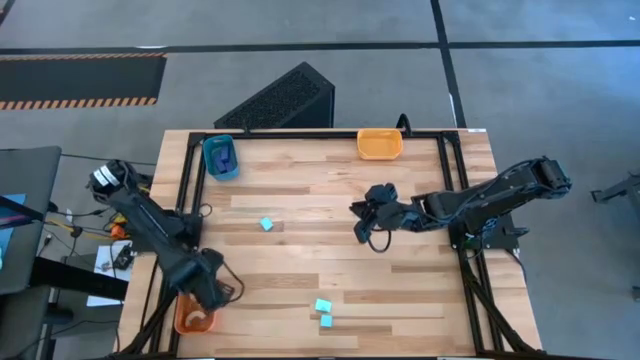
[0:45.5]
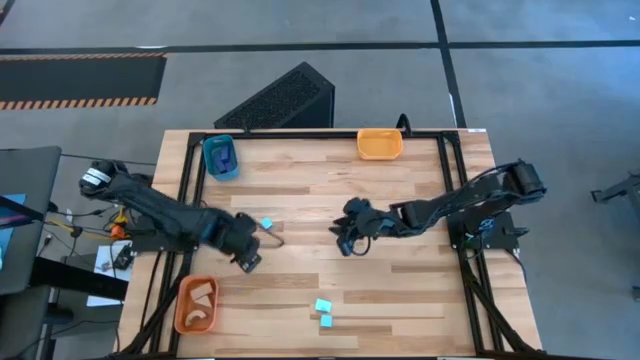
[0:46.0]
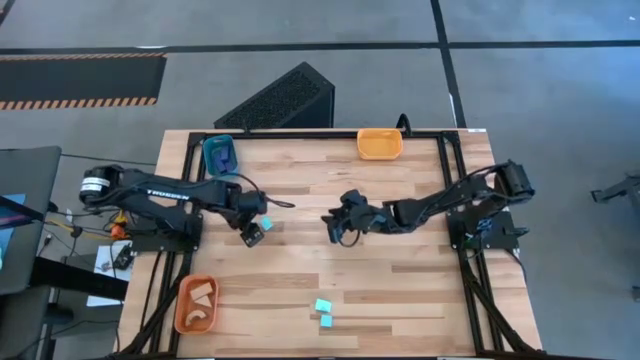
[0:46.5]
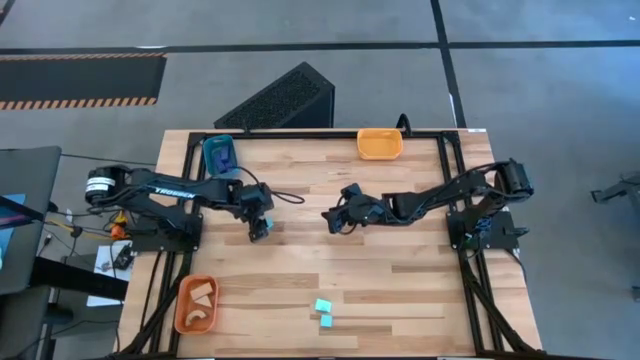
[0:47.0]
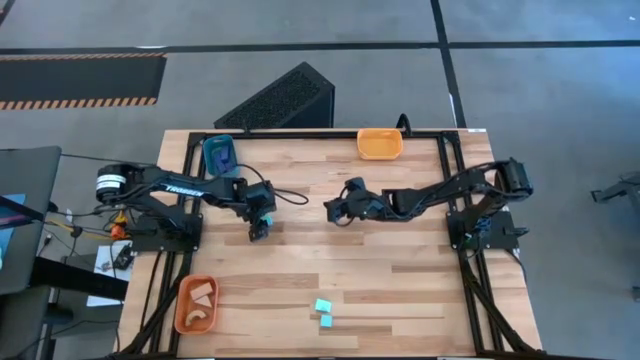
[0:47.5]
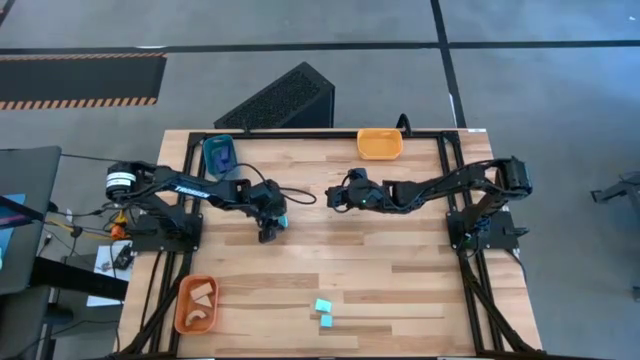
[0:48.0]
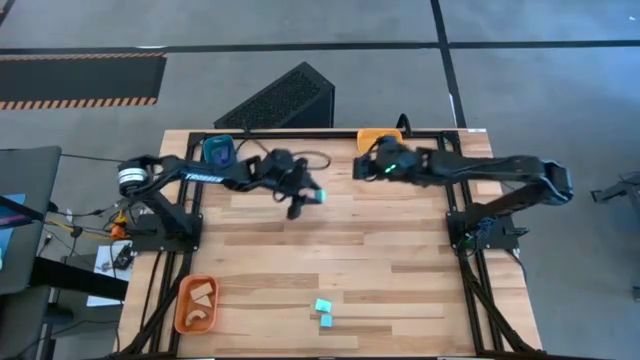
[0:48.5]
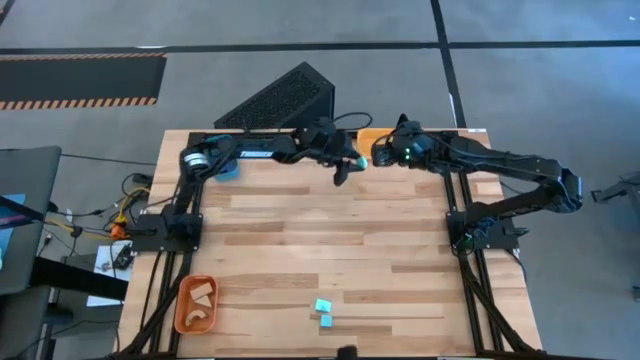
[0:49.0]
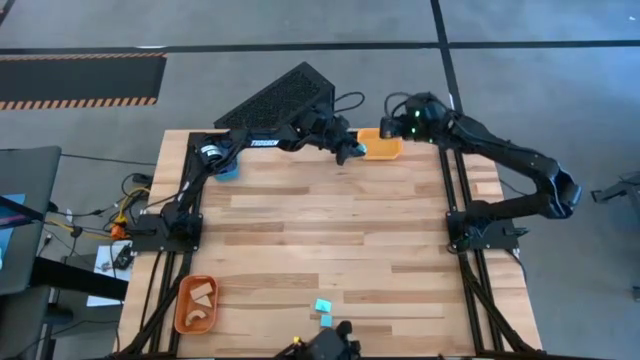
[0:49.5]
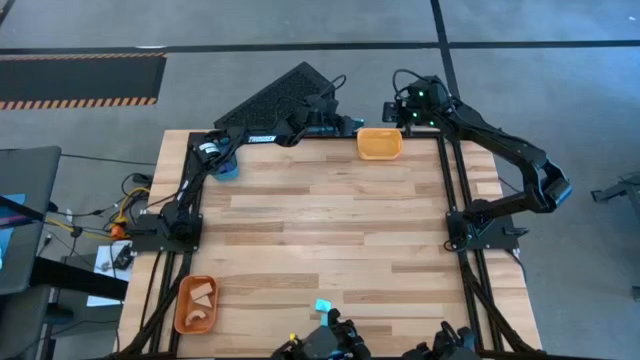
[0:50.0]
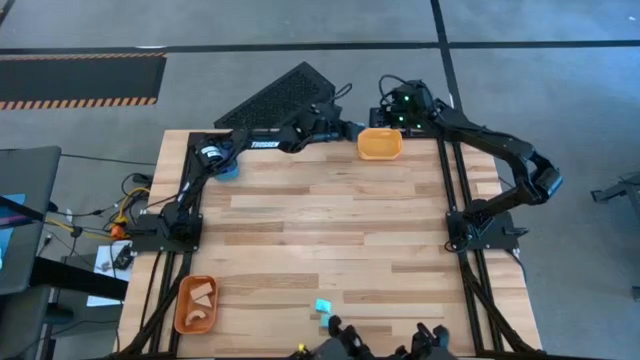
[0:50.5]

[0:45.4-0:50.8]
Task: Sort & place blocks by color
Put the top light blue block into the yellow bin

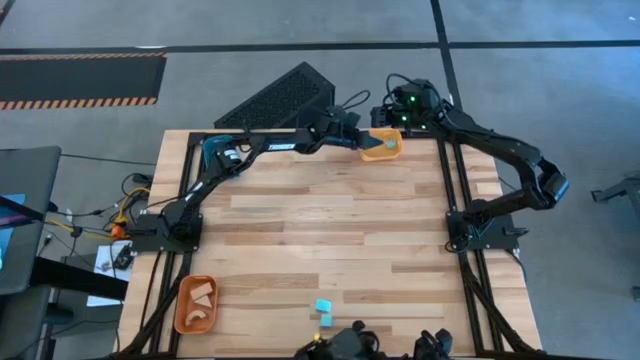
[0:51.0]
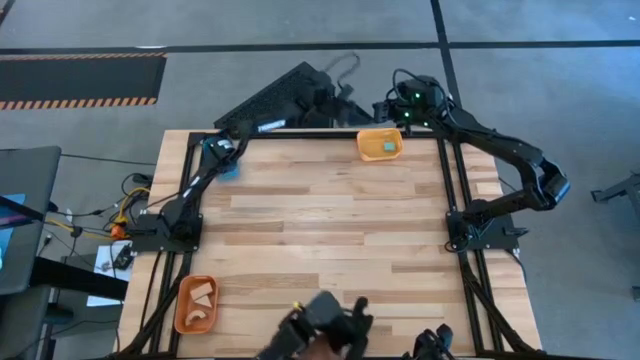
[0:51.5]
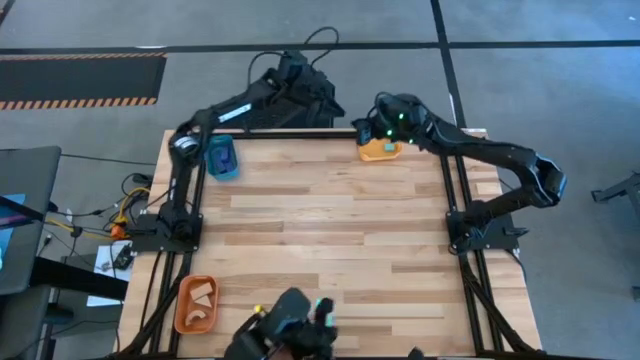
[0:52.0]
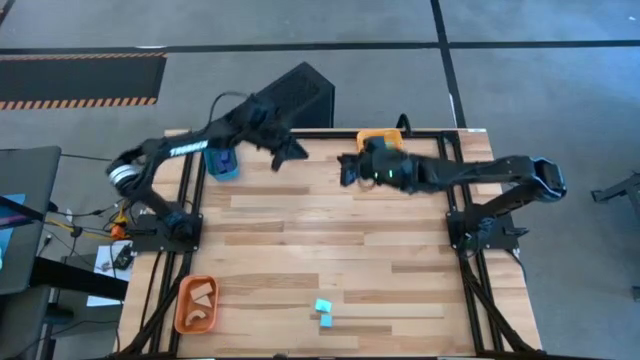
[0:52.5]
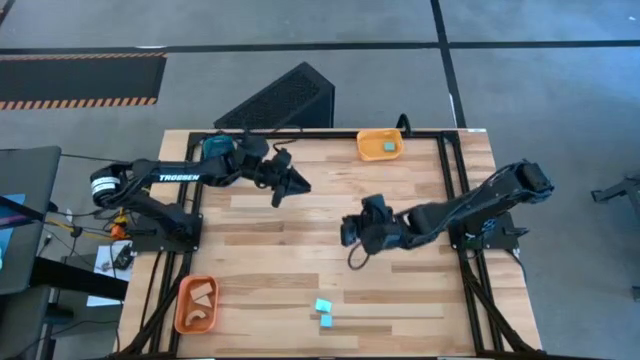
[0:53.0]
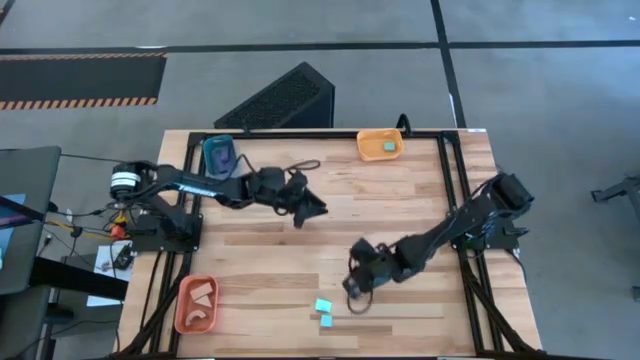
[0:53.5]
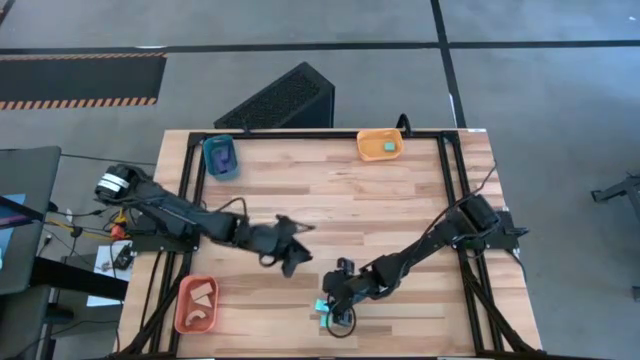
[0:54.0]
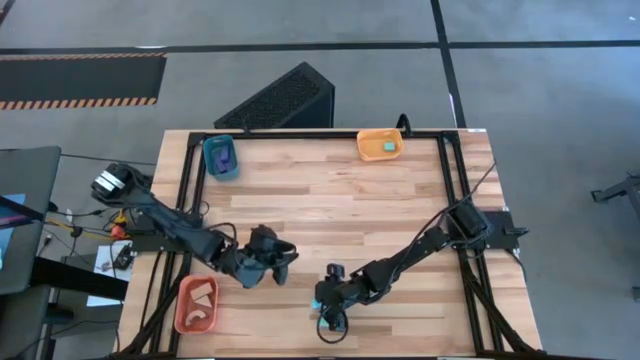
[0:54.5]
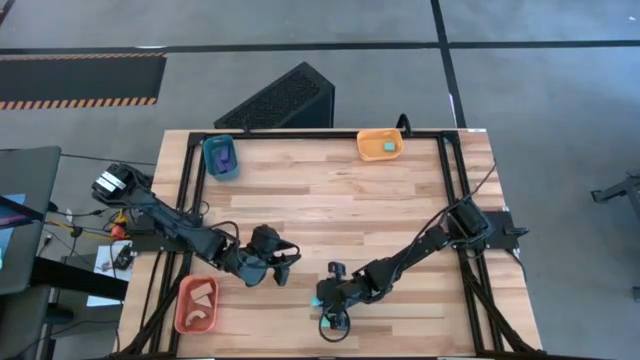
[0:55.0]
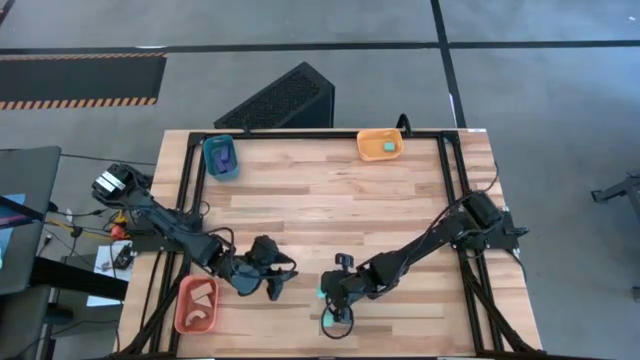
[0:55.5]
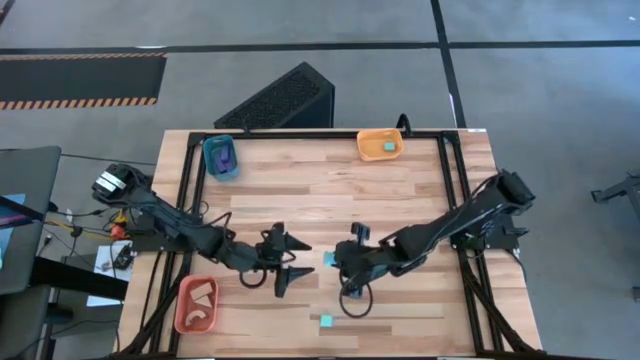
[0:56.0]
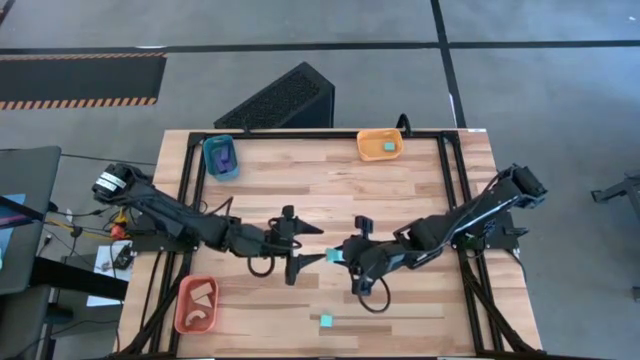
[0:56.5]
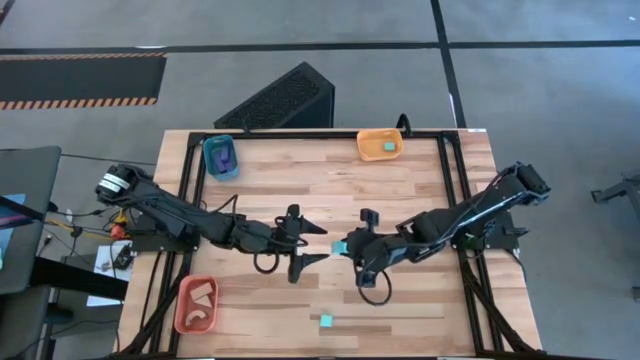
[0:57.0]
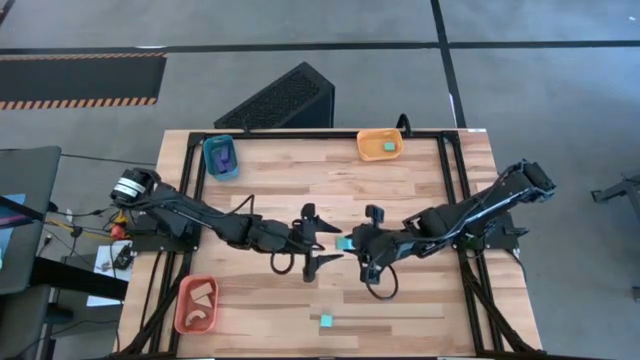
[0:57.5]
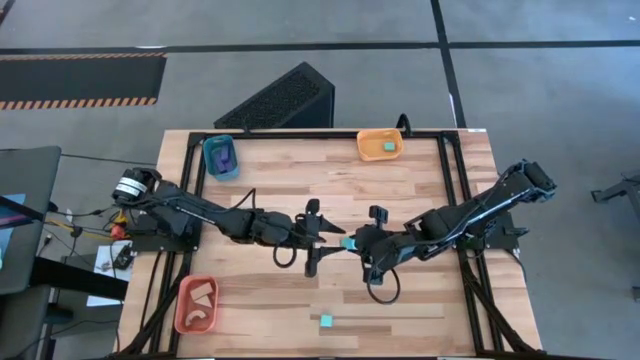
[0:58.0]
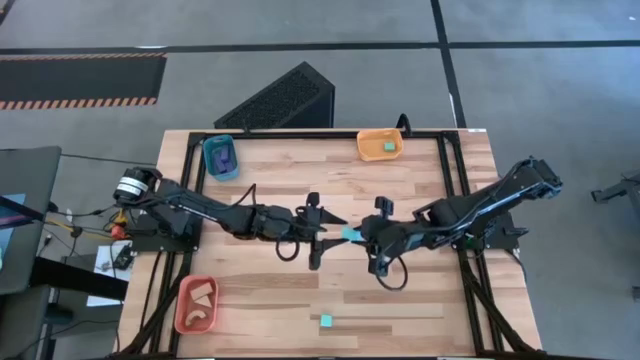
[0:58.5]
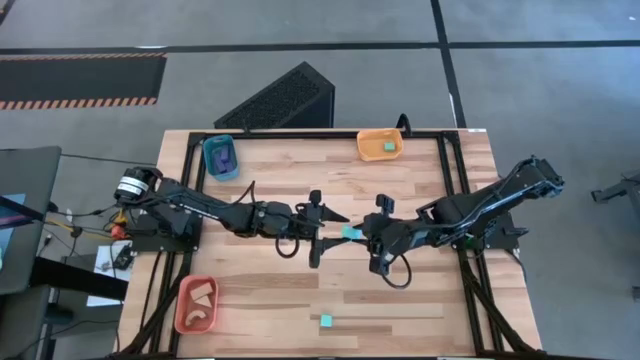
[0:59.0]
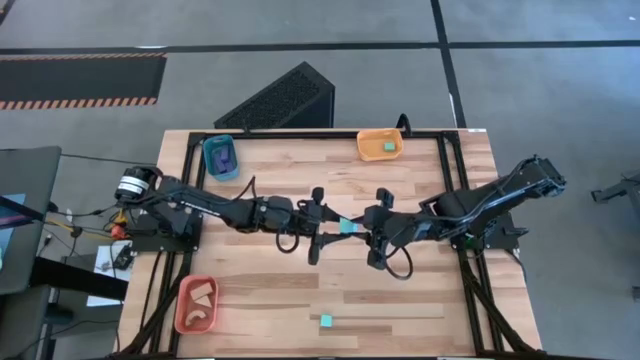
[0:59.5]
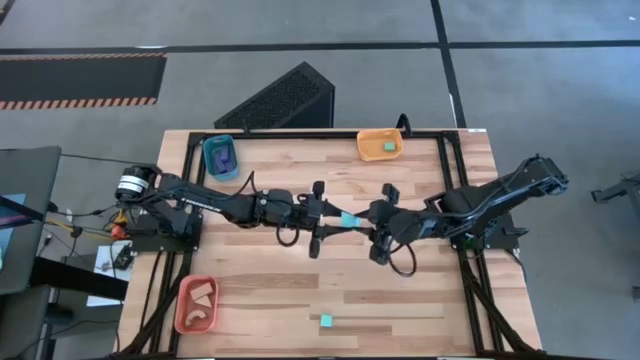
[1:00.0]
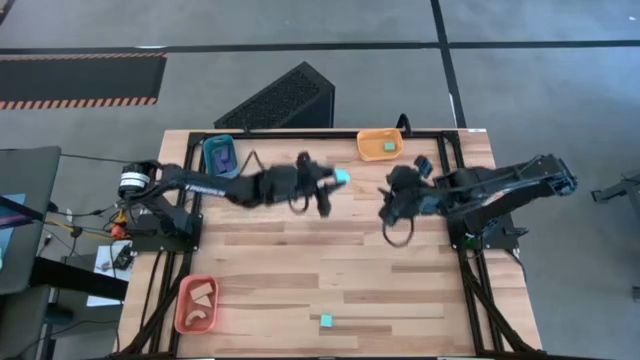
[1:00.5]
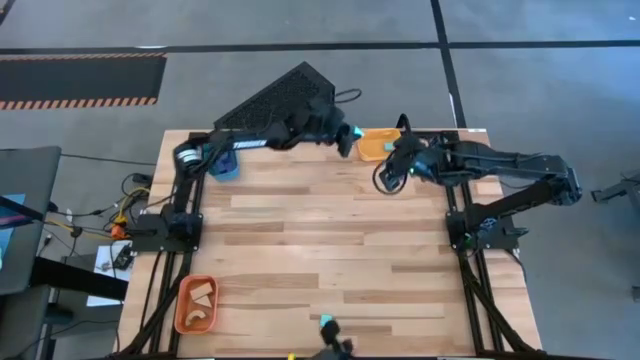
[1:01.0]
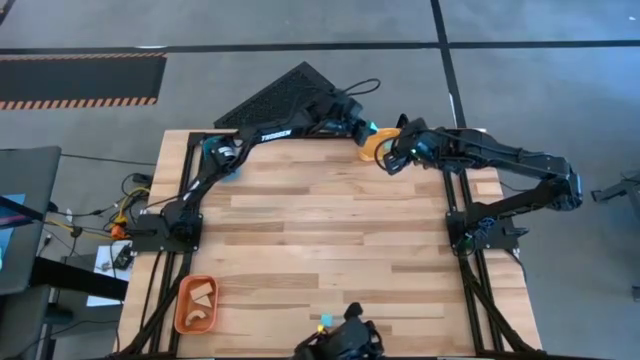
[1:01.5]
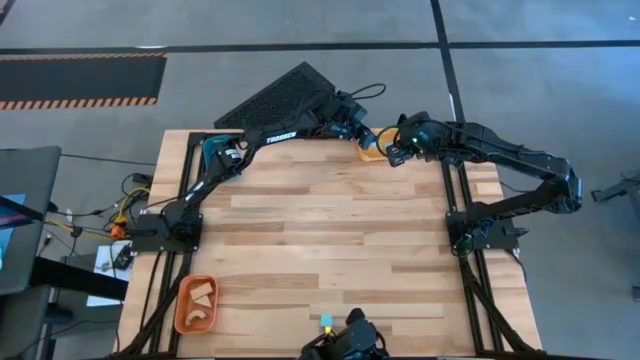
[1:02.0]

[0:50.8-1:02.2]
Put the top light blue block into the yellow bin

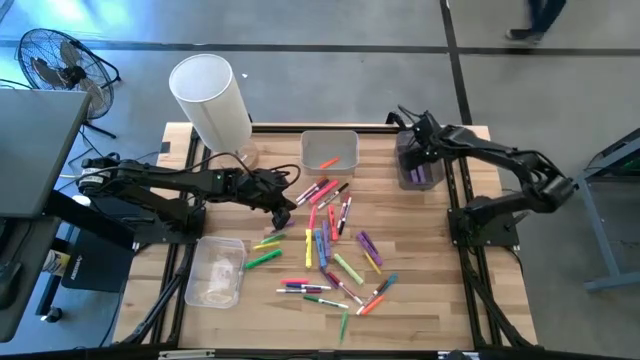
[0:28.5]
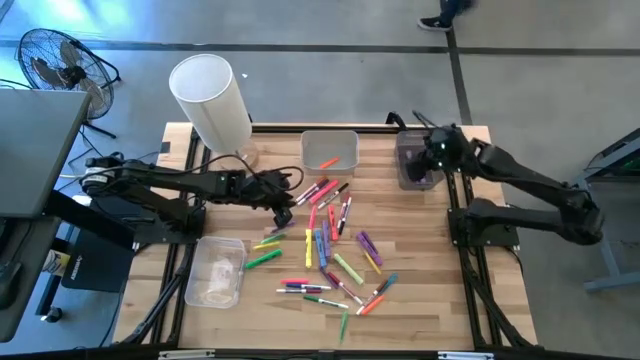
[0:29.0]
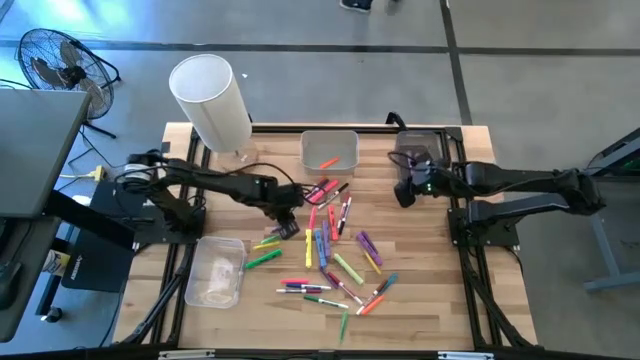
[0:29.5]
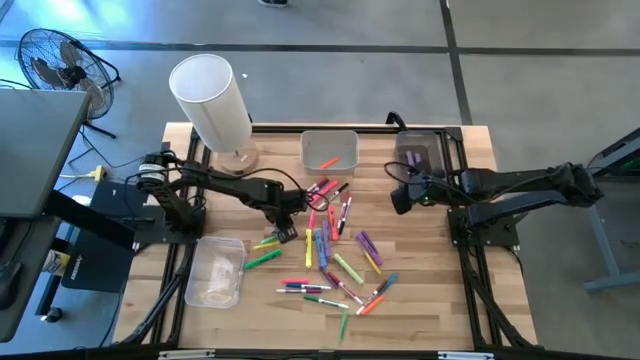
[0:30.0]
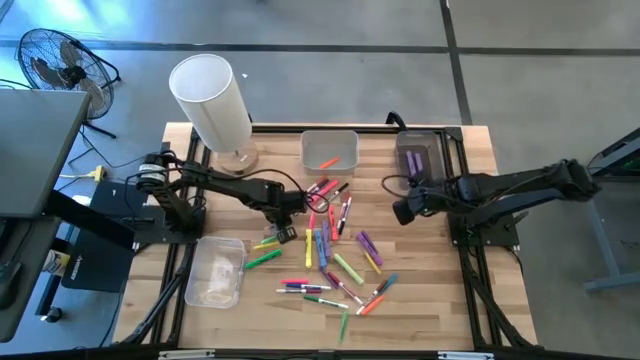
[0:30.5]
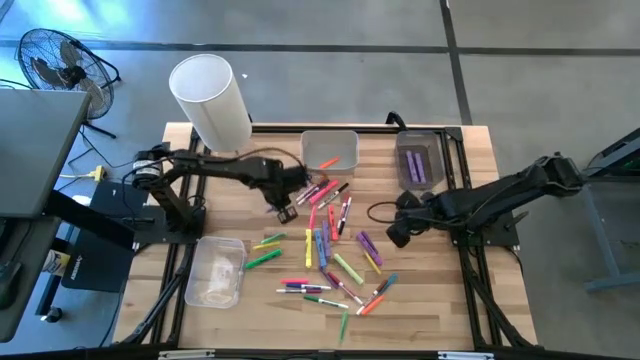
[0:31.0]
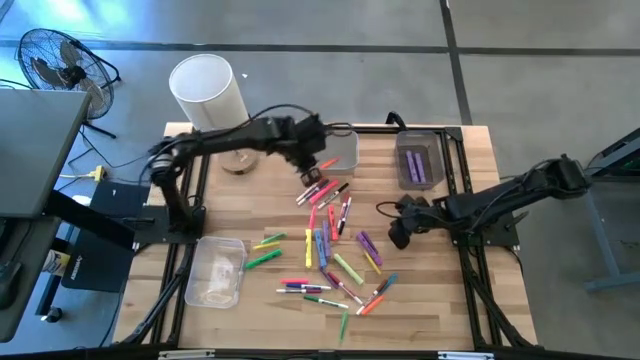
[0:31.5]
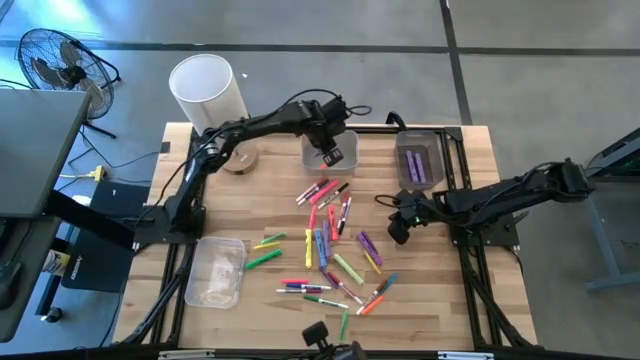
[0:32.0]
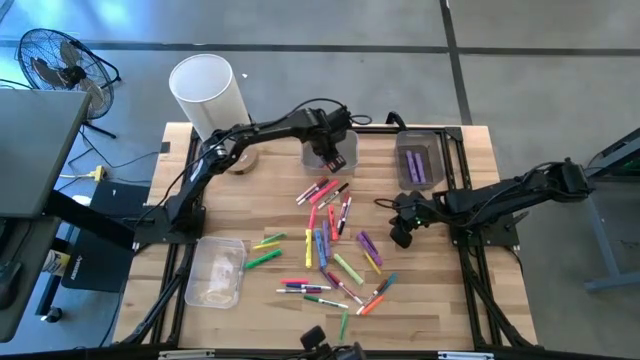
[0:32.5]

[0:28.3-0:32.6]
Task: Pick & Place Markers
Put the purple pen into the white bin
